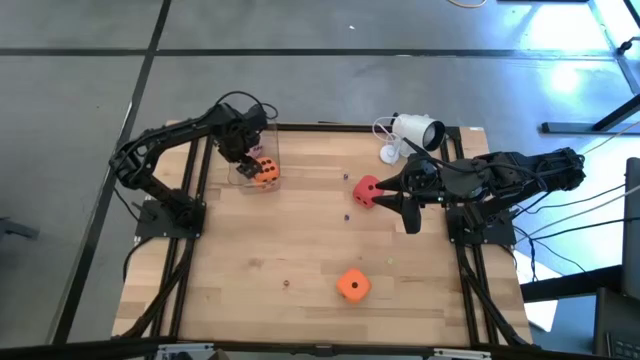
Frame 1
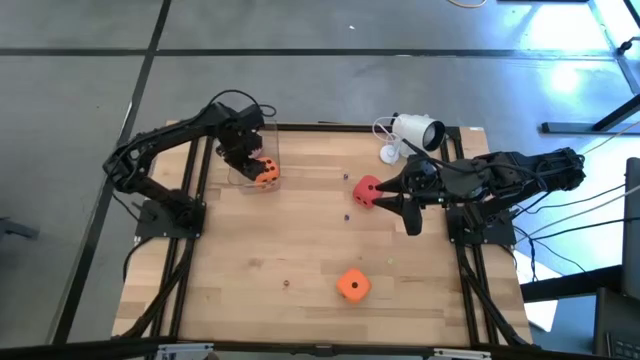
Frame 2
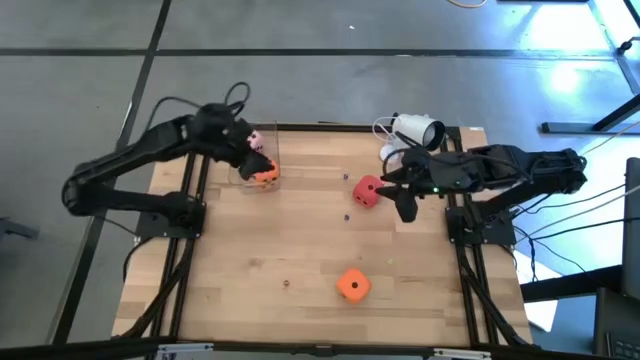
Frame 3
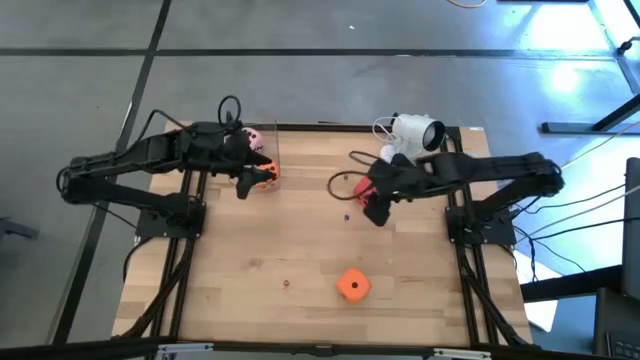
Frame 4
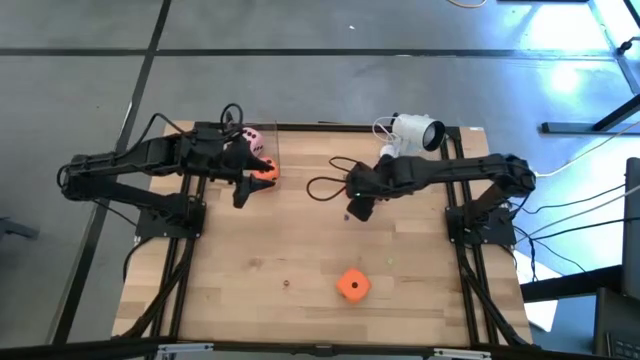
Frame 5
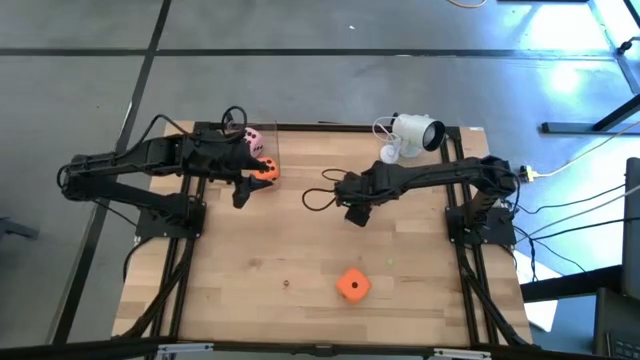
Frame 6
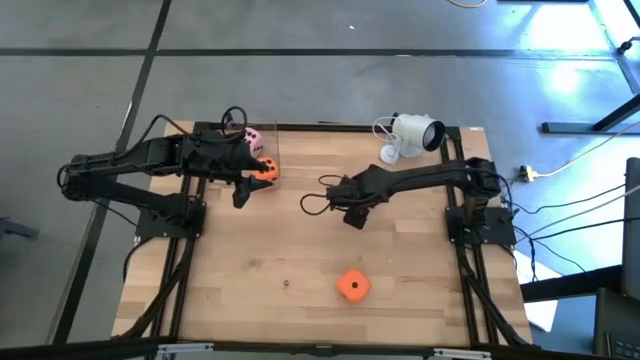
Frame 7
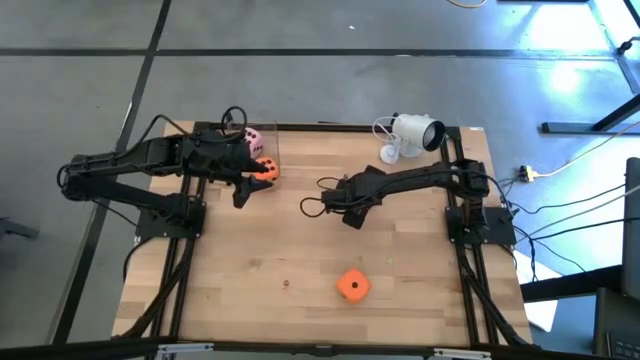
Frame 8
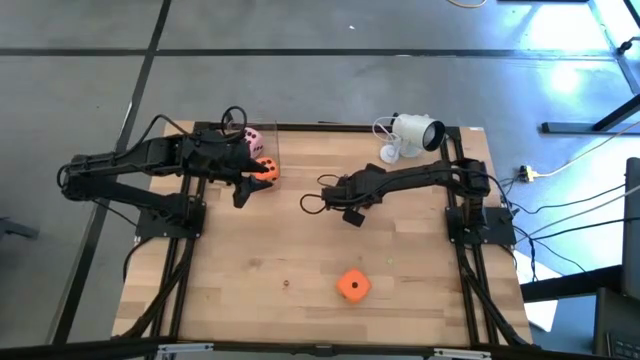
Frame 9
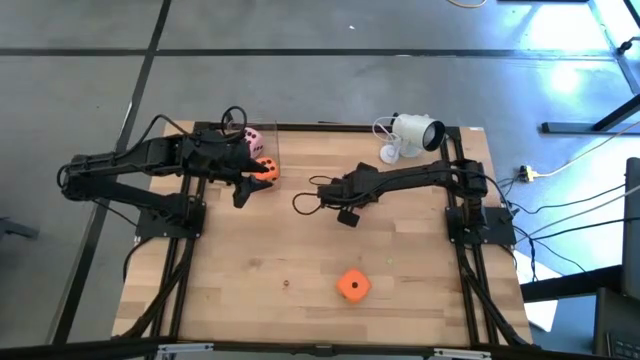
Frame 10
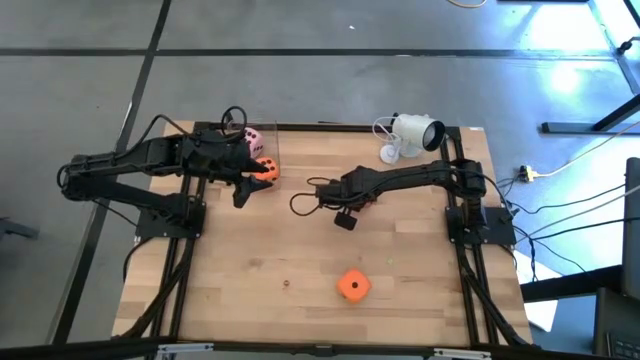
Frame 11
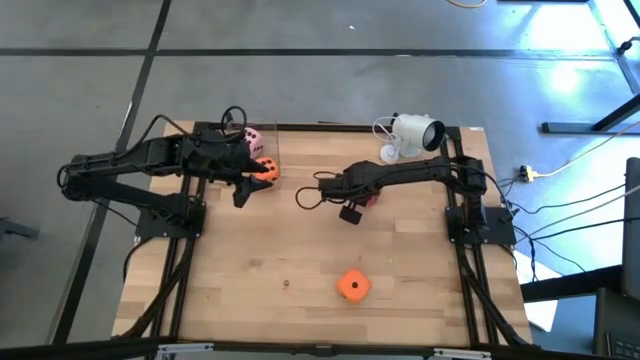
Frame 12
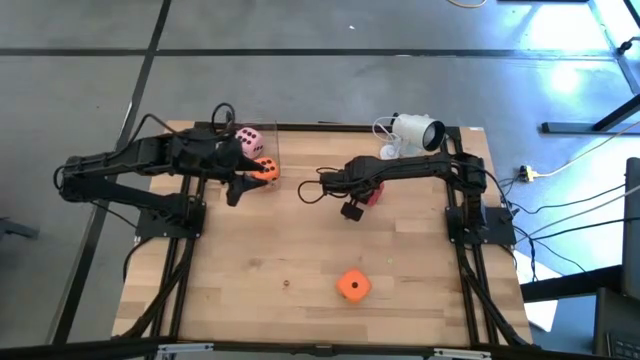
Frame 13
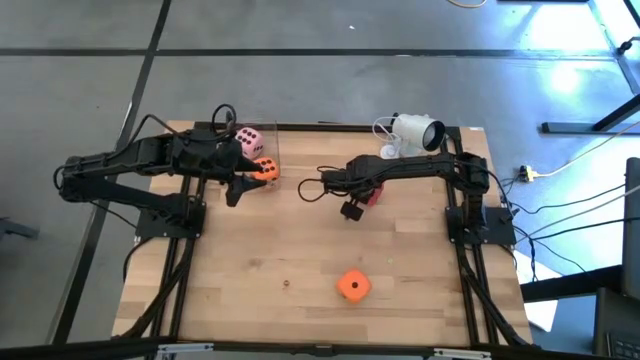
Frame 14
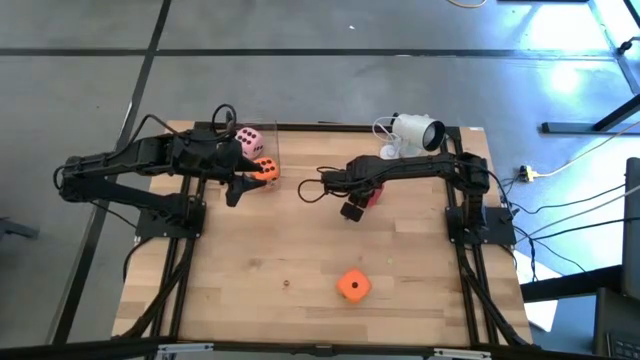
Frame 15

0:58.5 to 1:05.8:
Task: Pick & Place Dice
Put the large red dice into the transparent bin

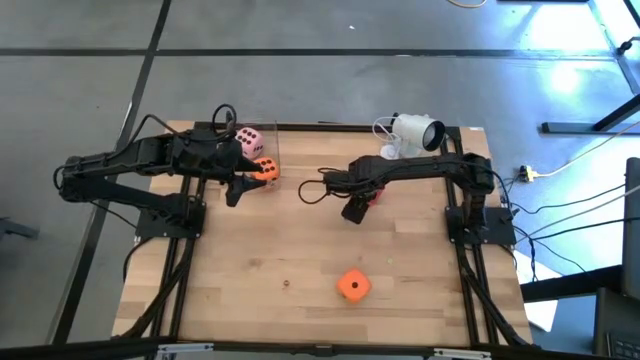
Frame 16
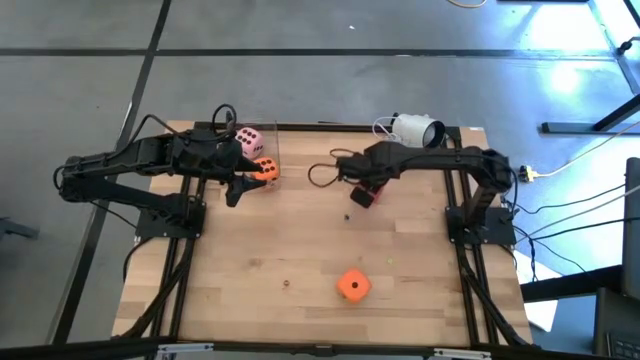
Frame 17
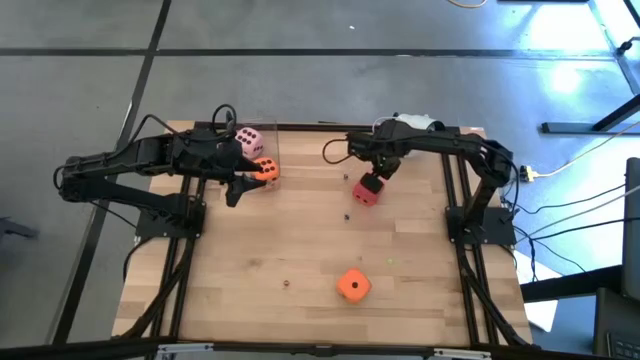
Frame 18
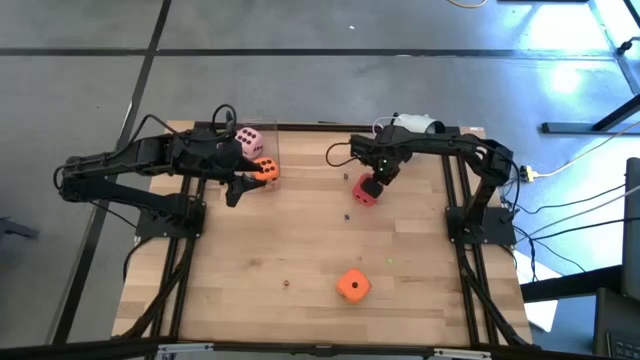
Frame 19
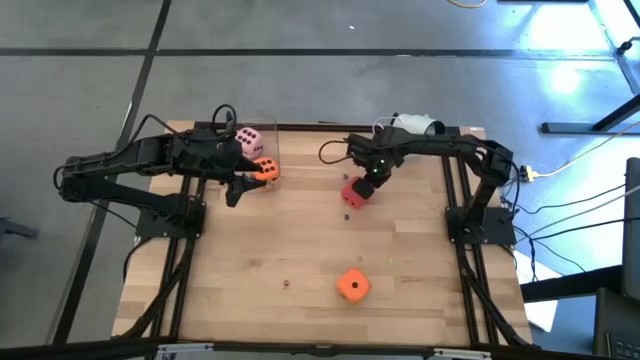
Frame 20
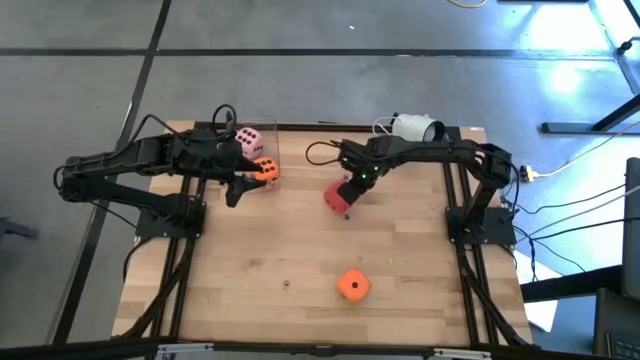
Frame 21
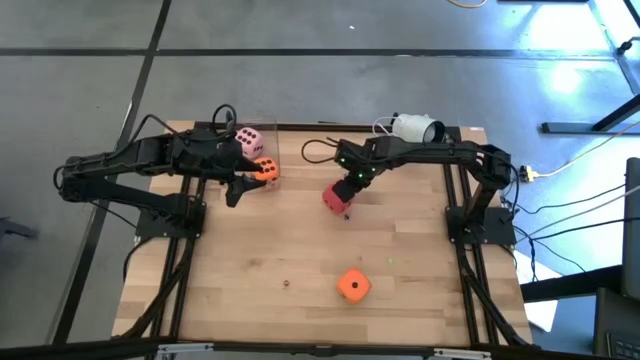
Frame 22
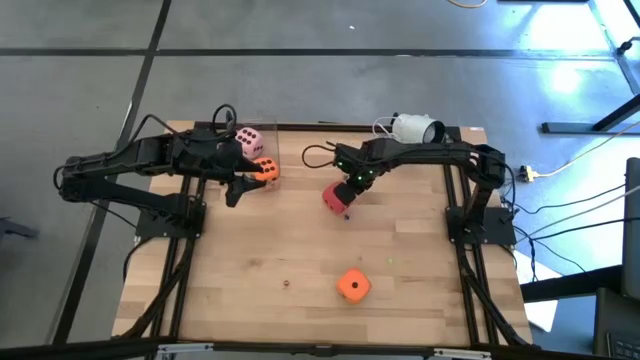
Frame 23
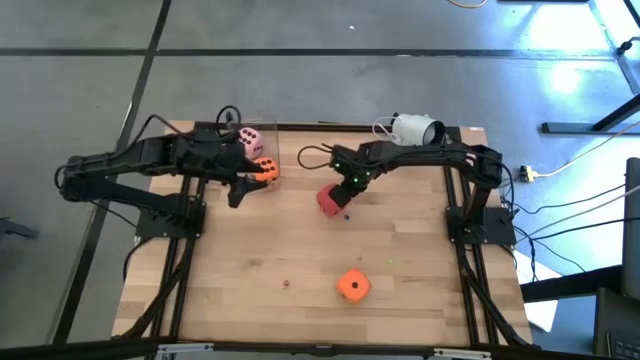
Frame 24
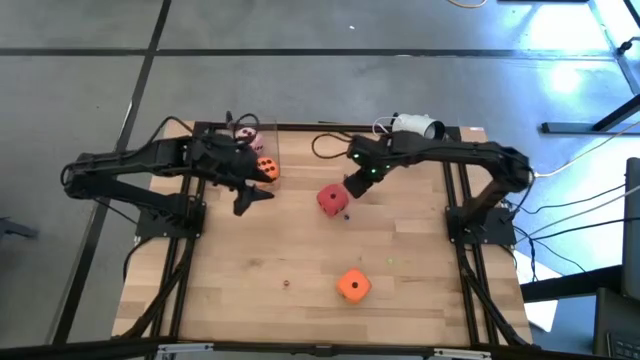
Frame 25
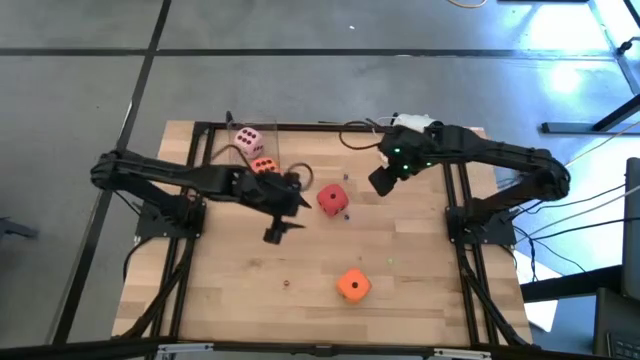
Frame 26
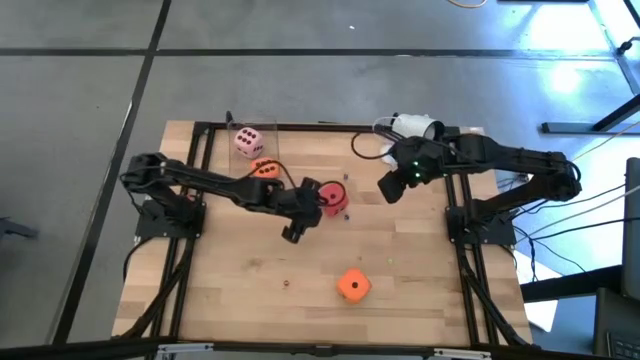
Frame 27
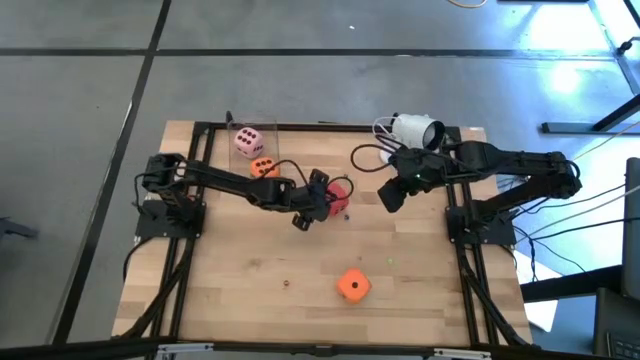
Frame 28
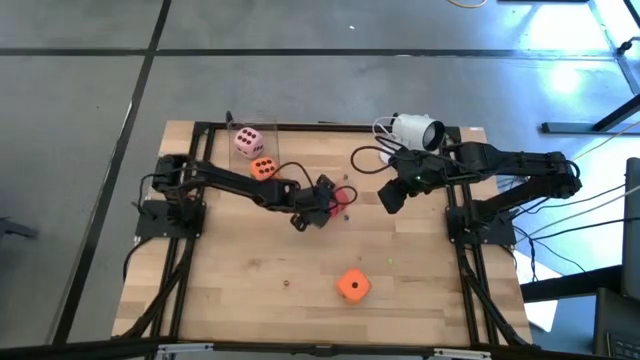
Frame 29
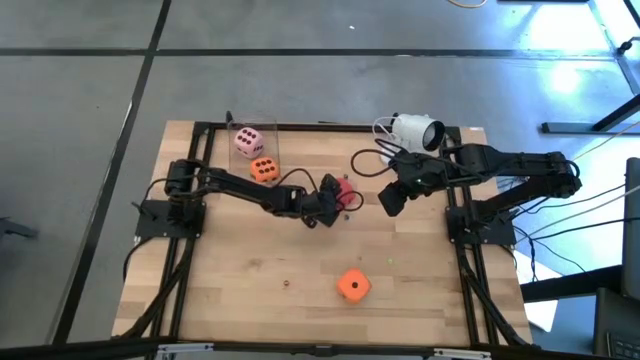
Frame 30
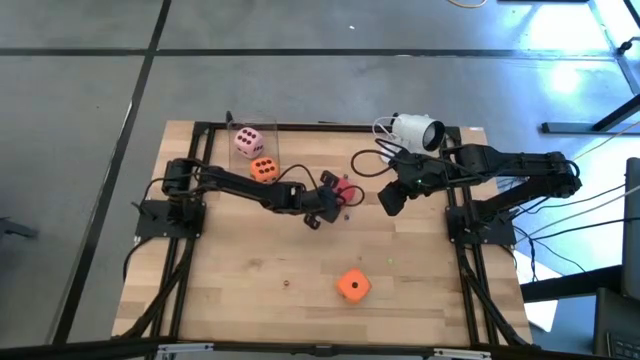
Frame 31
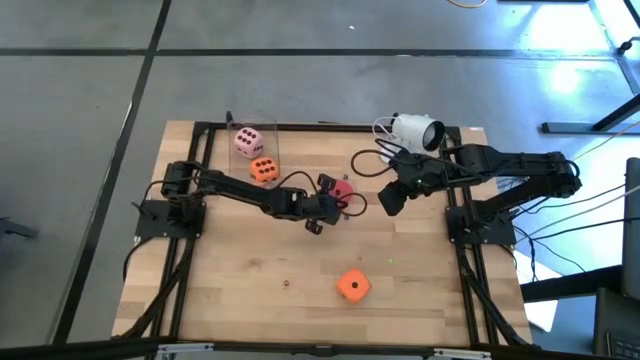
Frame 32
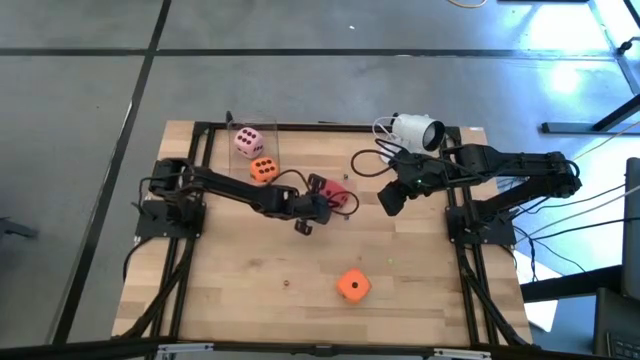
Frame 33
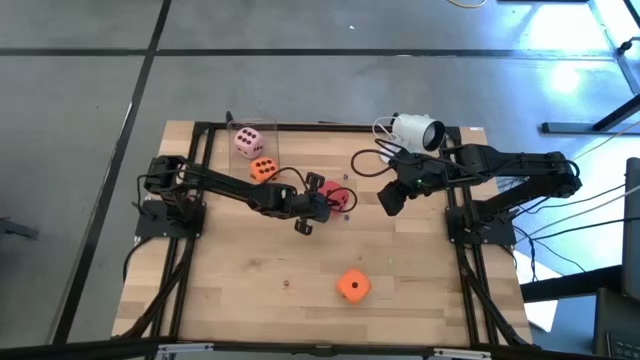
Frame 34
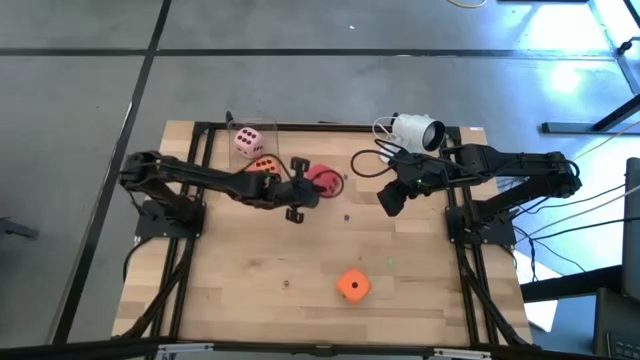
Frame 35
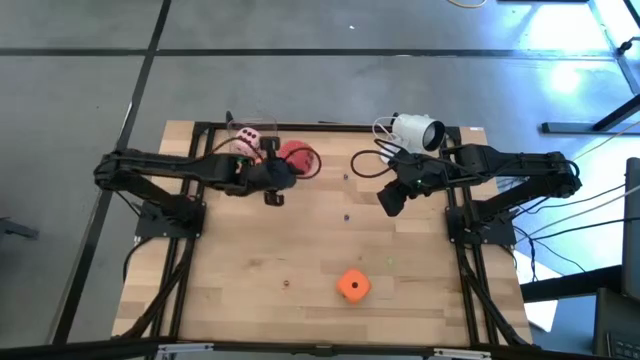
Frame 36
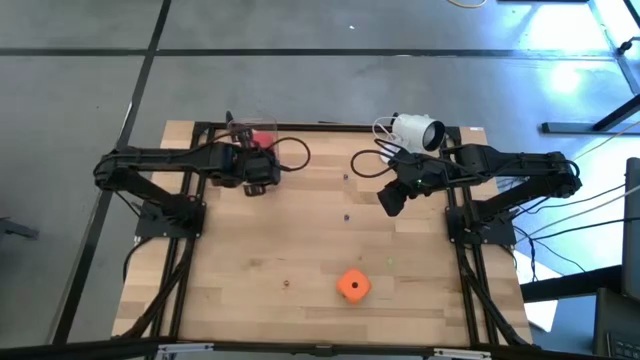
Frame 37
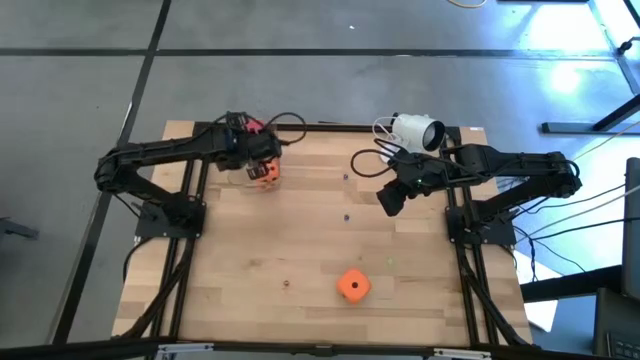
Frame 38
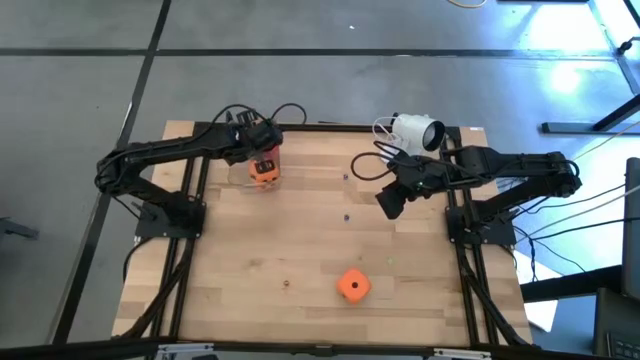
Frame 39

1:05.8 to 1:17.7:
Put the large red dice into the transparent bin

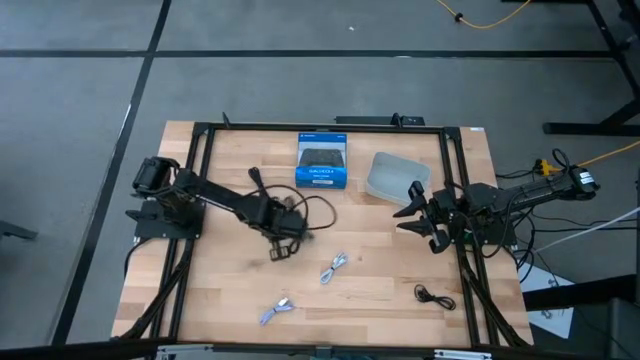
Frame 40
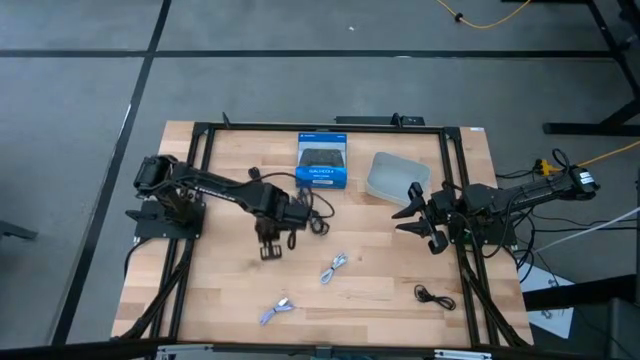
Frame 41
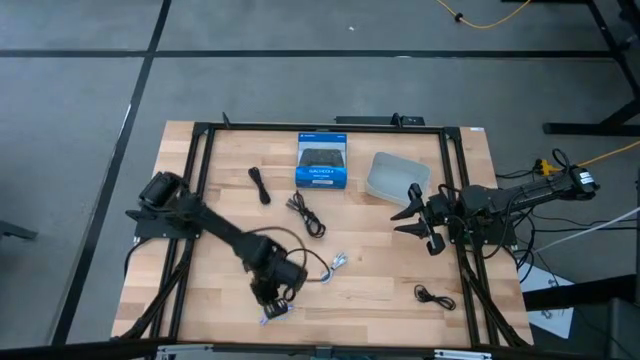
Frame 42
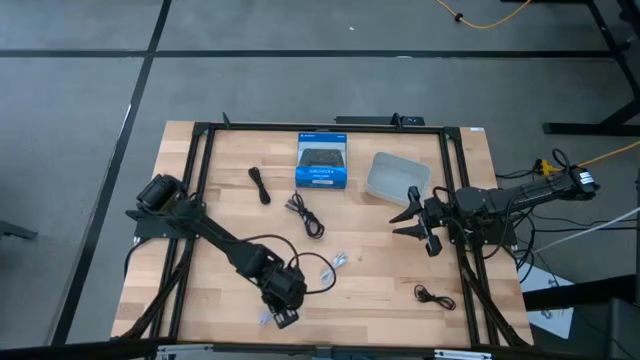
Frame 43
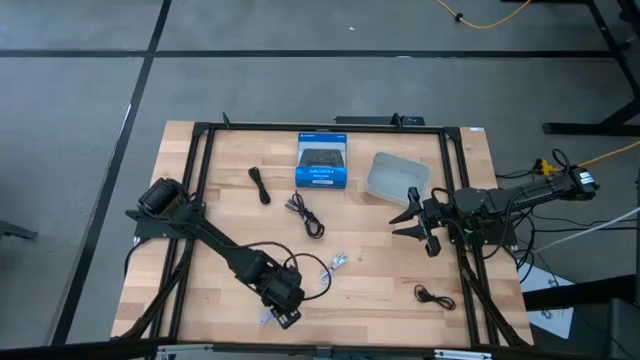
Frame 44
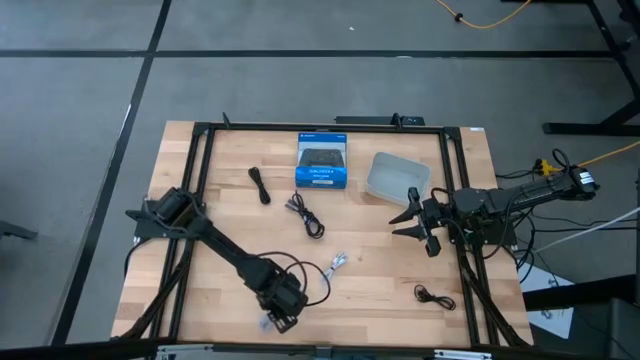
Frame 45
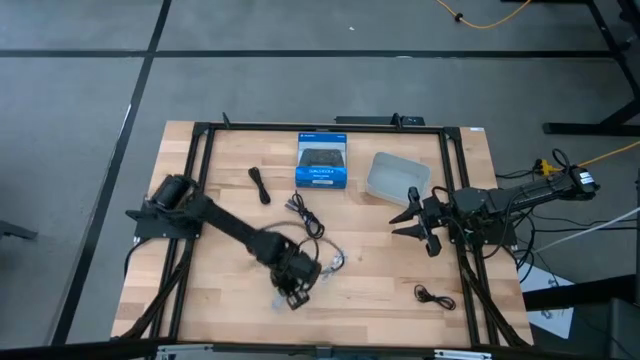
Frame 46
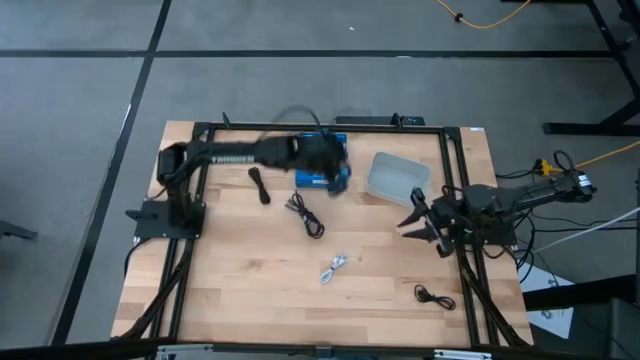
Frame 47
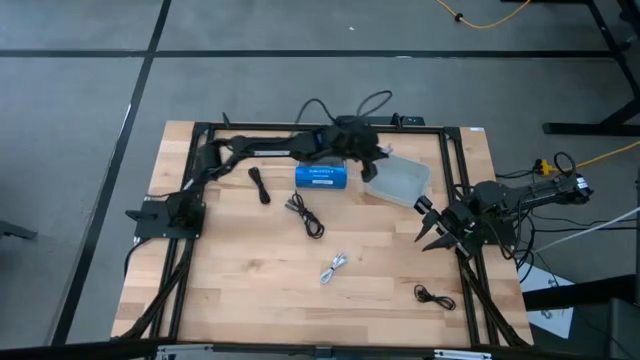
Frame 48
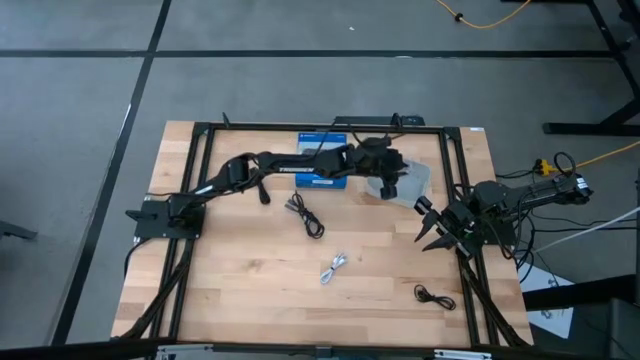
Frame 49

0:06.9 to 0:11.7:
Task: Pick and place USB-C Cables
Put the gray charger cable into the gray bin
